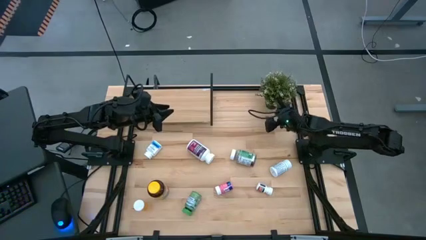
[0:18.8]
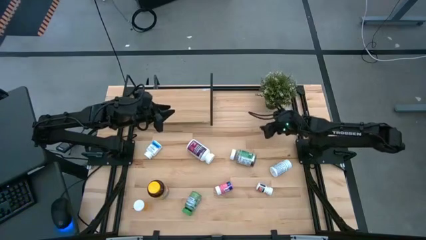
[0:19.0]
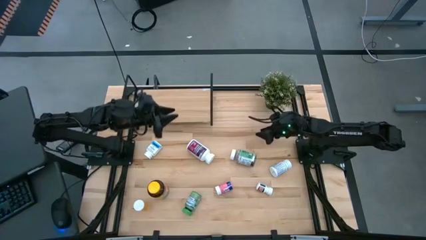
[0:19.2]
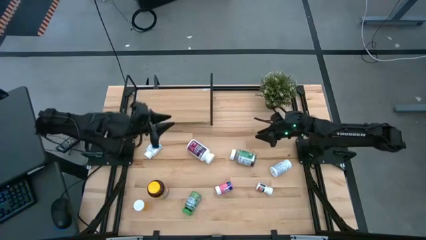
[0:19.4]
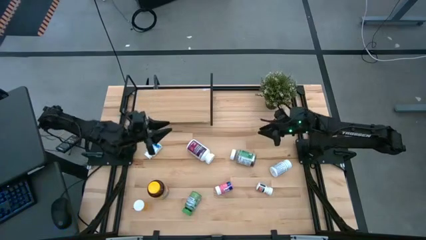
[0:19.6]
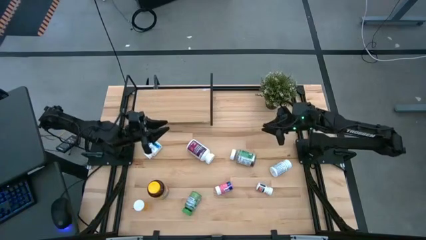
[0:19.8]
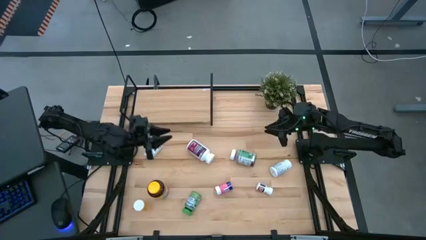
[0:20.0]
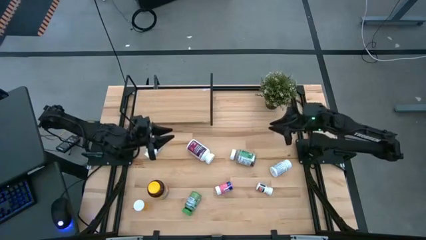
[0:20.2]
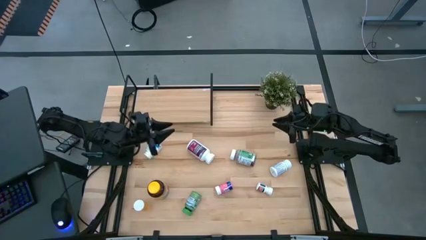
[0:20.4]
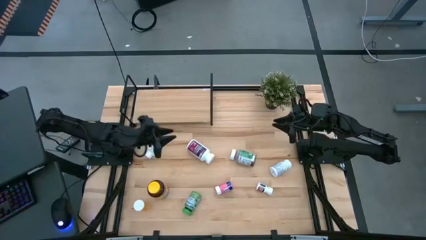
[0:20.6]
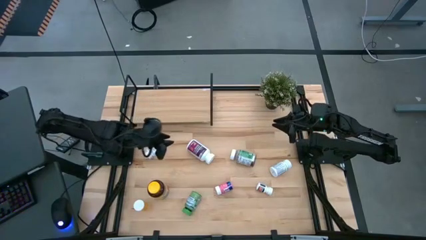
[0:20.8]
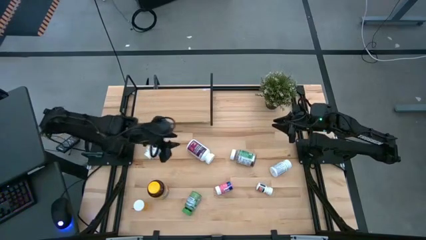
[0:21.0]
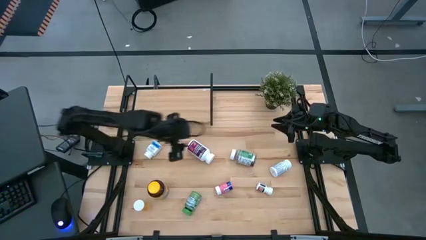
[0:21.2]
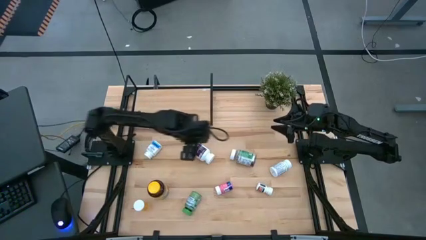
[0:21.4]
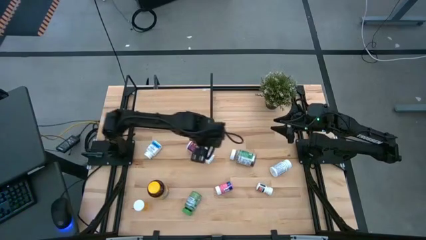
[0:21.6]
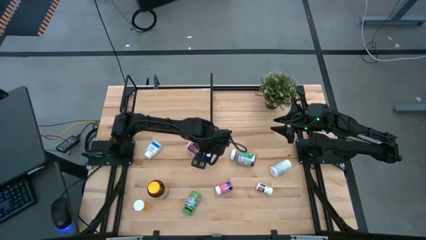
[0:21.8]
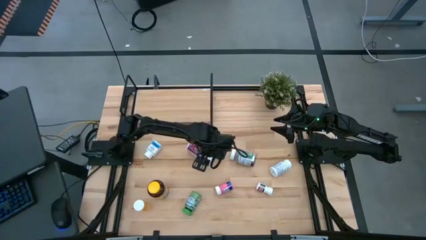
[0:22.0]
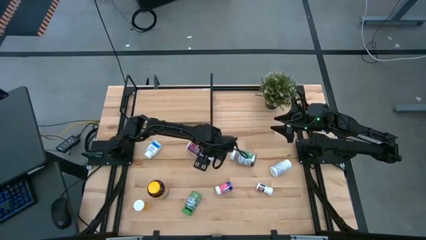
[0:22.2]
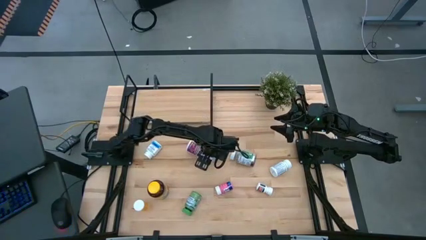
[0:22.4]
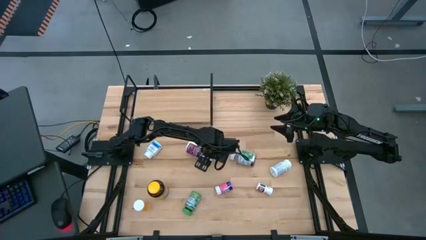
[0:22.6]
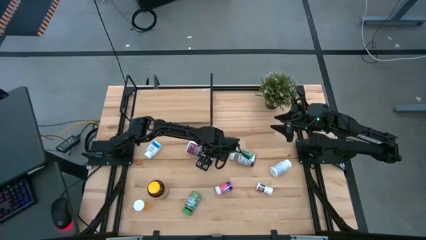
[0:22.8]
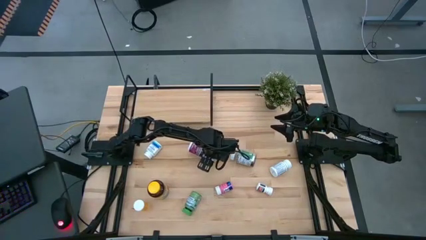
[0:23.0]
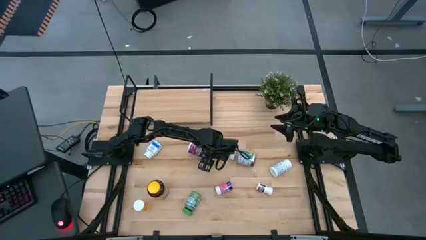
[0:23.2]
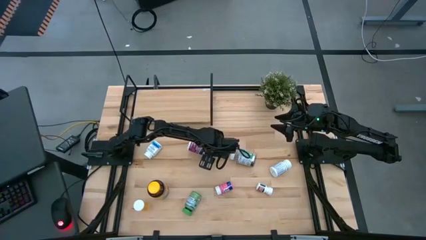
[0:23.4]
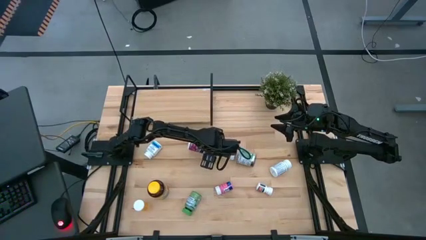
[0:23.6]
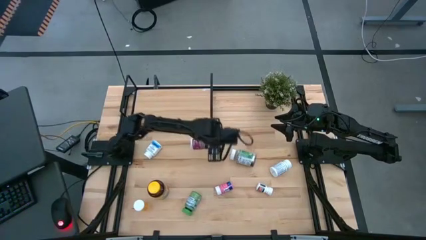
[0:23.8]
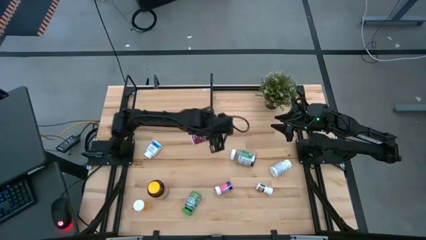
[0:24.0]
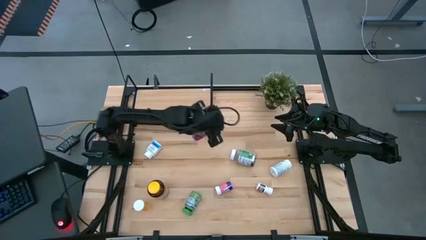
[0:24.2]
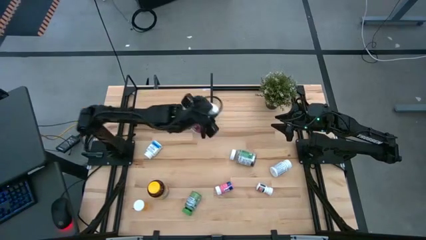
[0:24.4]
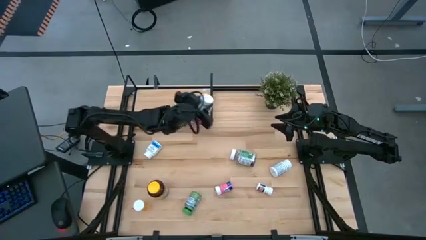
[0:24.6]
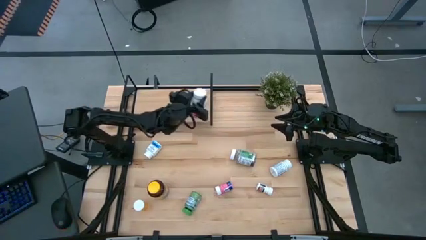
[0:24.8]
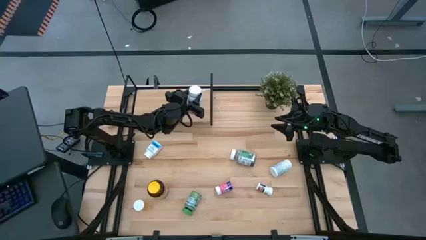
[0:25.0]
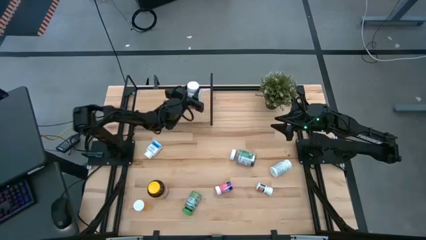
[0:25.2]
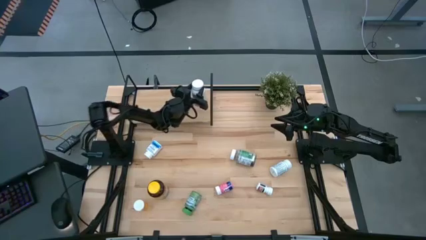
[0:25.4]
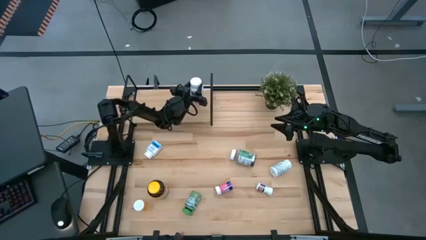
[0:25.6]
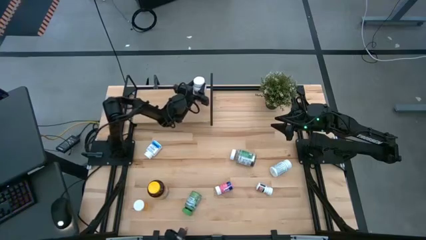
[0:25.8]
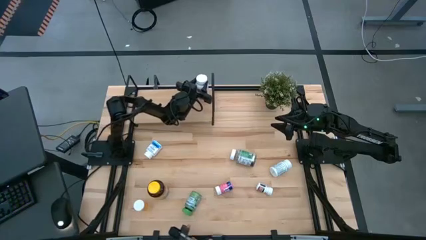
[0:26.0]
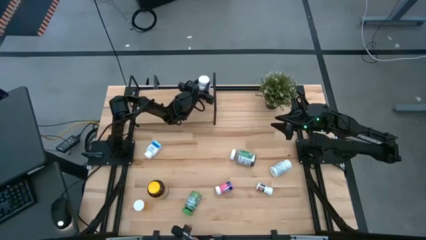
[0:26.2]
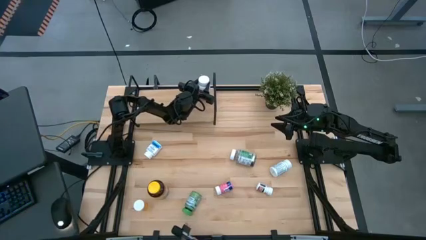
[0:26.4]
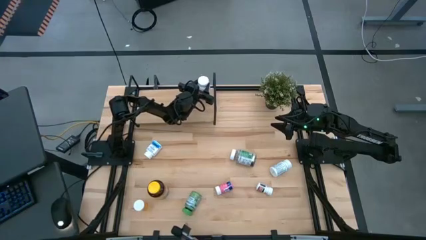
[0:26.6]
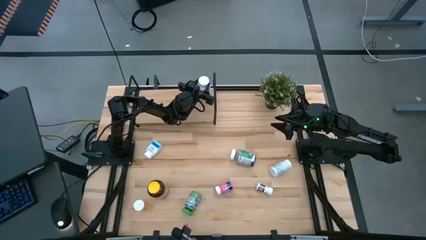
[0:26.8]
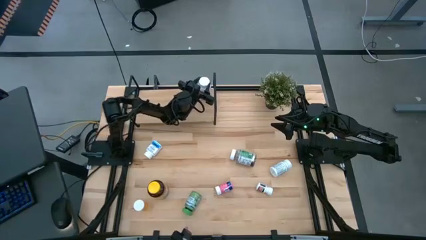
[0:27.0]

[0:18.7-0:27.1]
Task: Pick and place medicine bottles onto shelf by color
Put the purple medicine bottle on the shelf

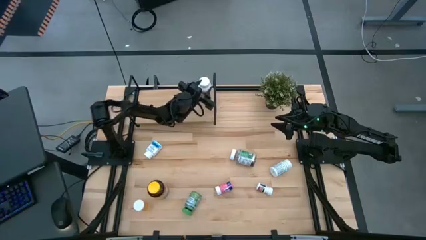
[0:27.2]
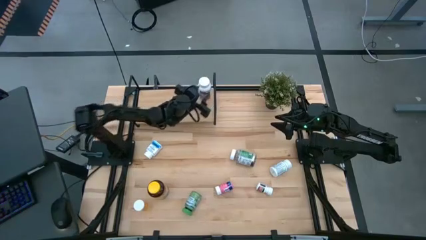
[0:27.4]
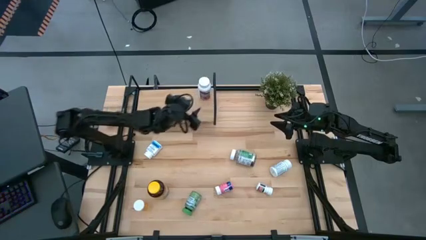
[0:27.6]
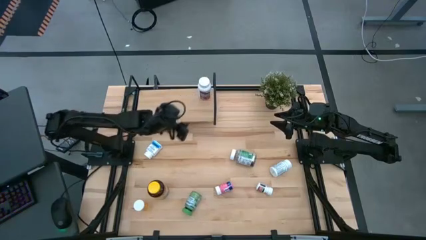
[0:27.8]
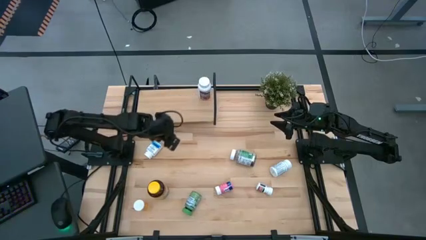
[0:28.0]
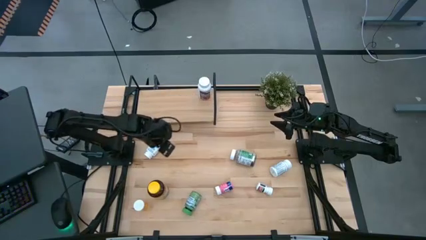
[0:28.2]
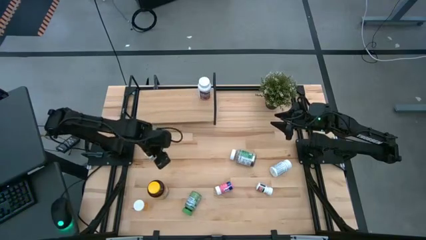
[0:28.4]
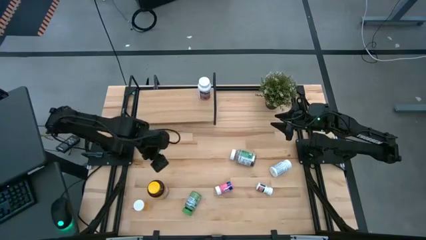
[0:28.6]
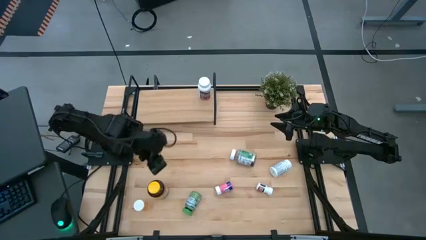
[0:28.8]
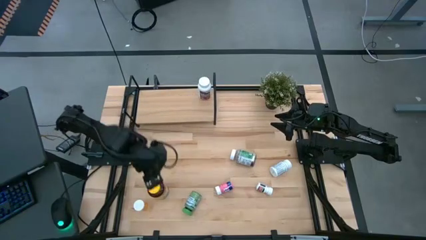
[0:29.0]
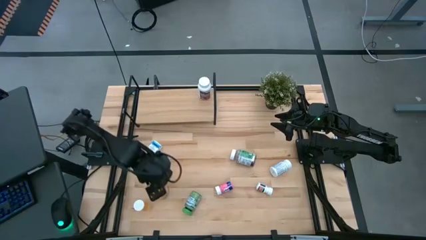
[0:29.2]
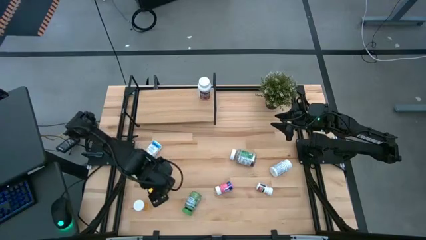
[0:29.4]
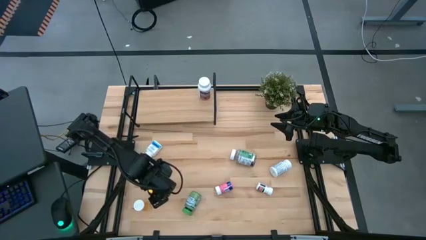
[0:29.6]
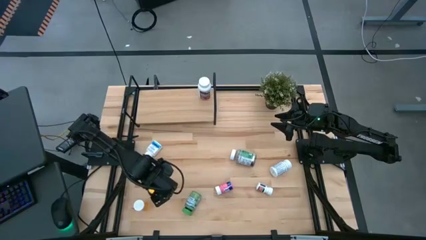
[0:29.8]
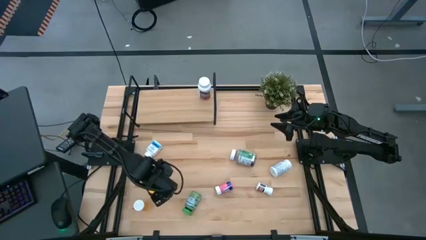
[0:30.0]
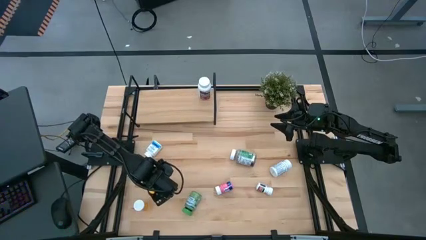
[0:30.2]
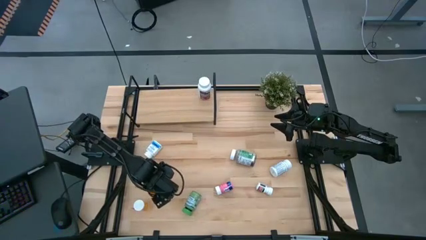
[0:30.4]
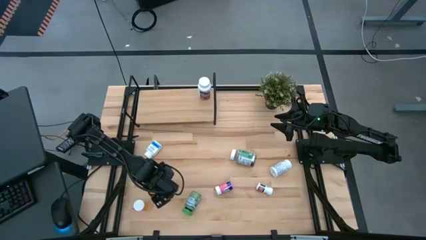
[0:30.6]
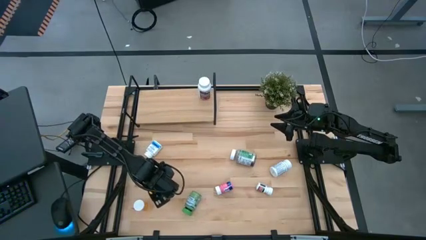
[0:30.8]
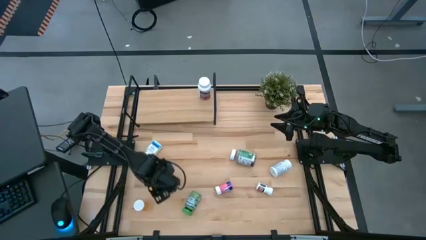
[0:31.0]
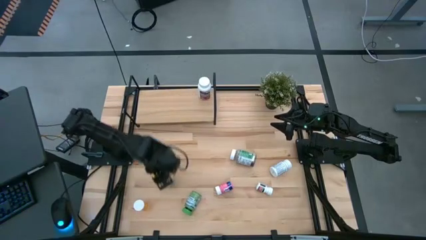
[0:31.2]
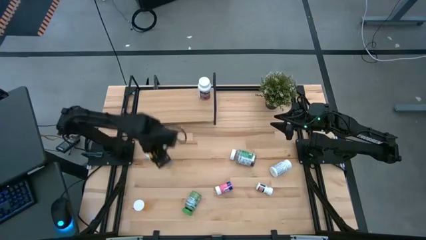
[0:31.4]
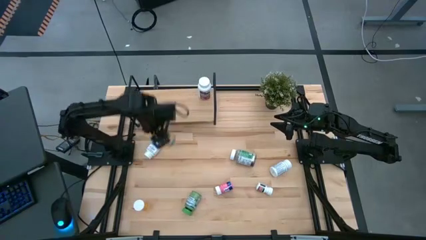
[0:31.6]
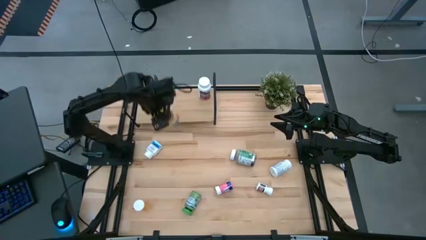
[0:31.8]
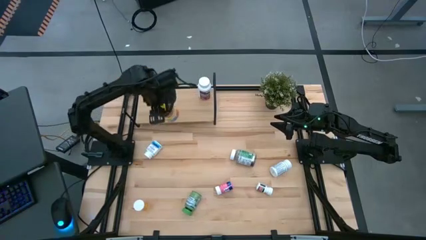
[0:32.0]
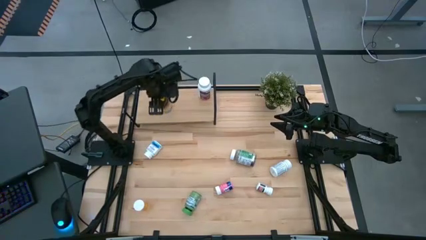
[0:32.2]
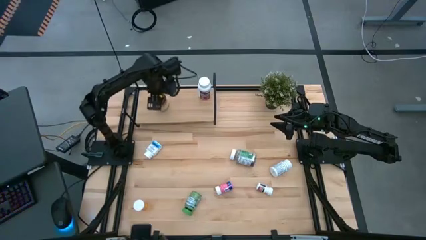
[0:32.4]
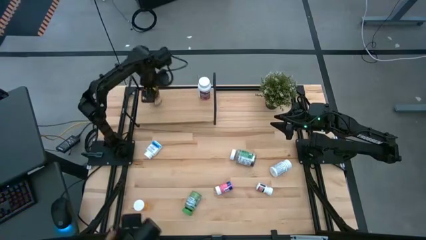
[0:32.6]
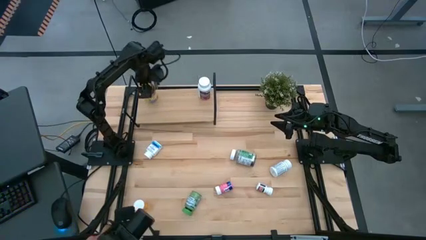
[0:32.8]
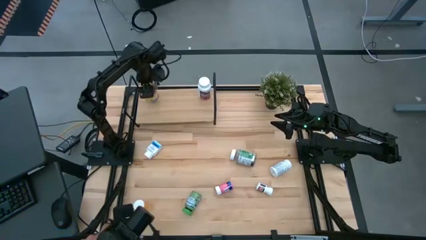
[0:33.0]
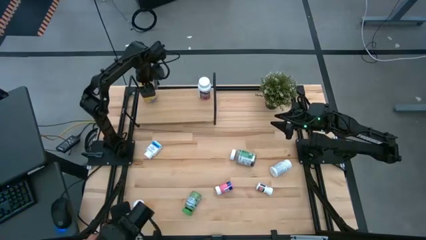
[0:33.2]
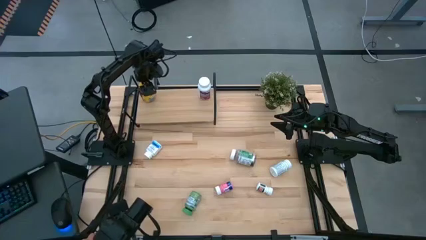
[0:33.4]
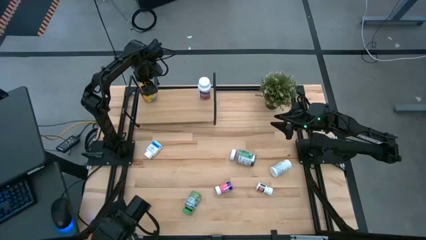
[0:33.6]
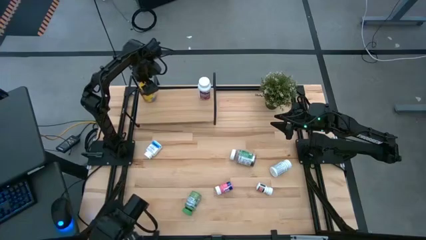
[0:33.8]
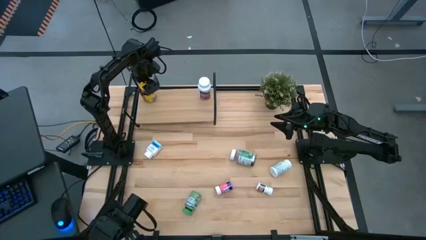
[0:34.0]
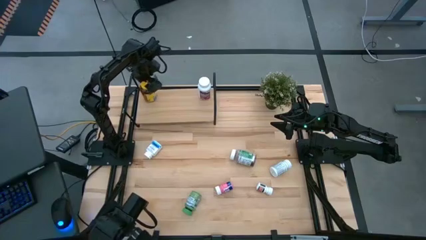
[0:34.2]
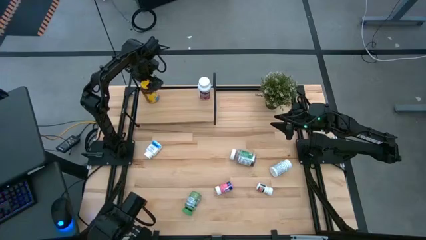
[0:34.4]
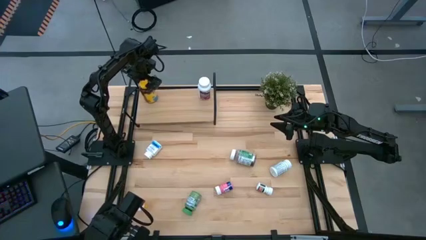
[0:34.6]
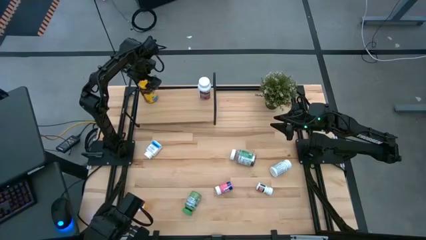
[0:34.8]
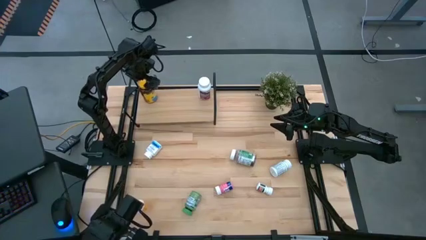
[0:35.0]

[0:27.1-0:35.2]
Put the yellow medicine bottle on the shelf
